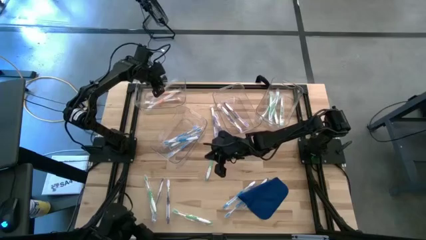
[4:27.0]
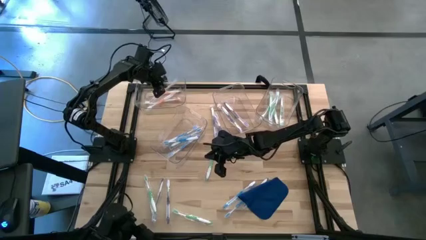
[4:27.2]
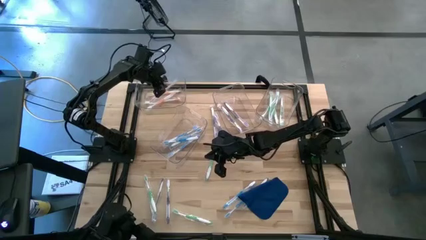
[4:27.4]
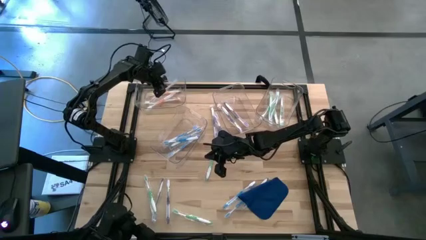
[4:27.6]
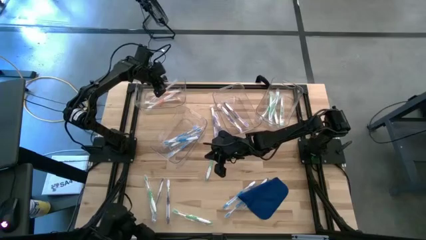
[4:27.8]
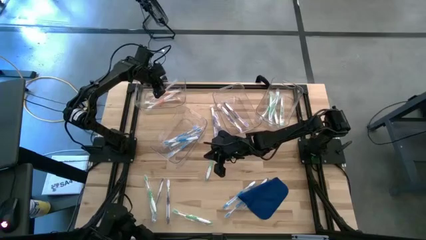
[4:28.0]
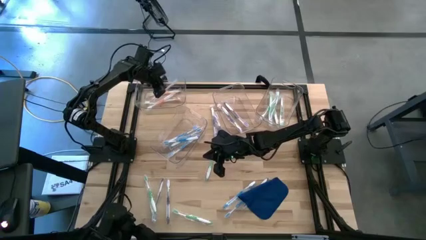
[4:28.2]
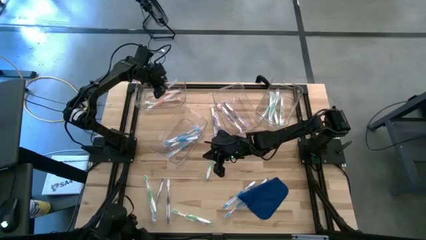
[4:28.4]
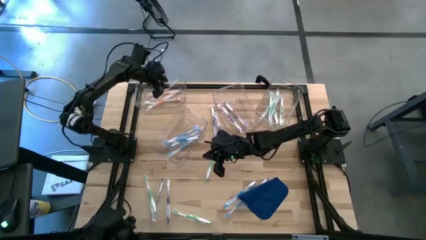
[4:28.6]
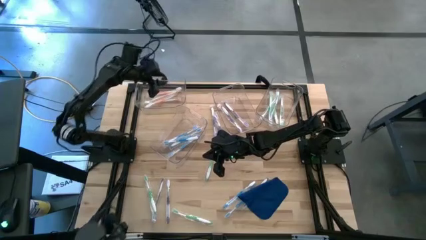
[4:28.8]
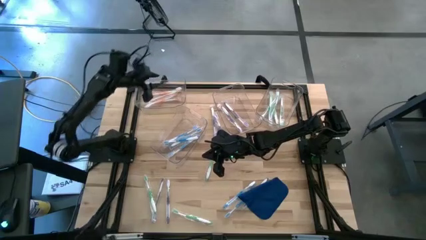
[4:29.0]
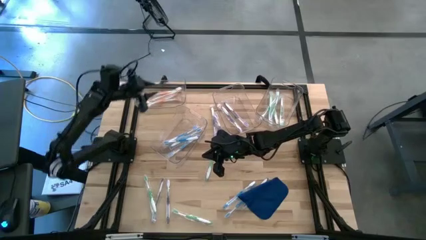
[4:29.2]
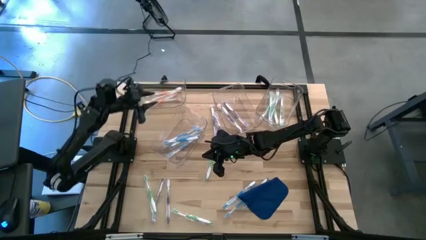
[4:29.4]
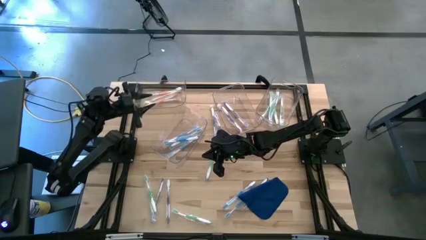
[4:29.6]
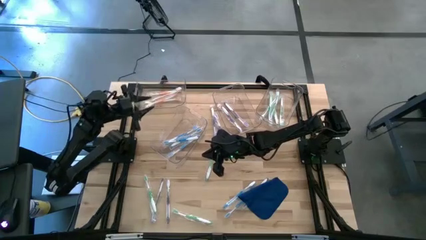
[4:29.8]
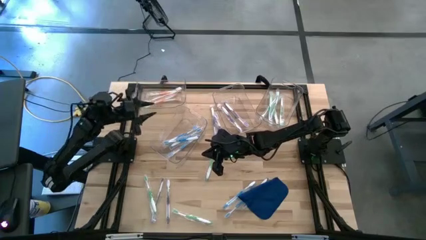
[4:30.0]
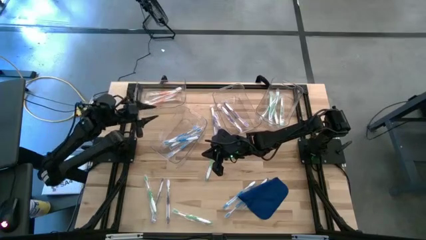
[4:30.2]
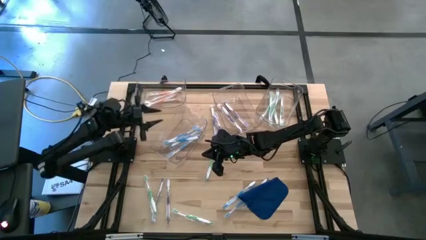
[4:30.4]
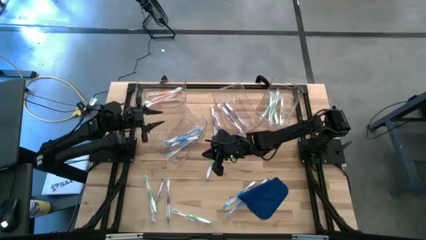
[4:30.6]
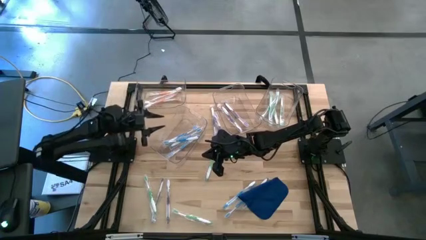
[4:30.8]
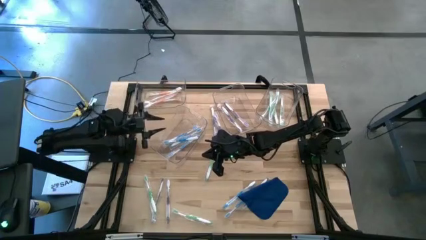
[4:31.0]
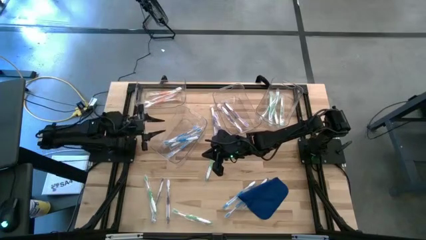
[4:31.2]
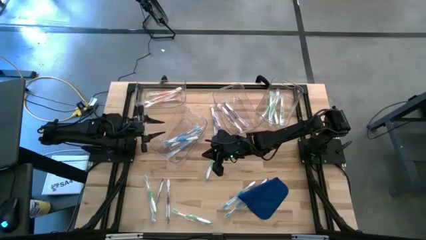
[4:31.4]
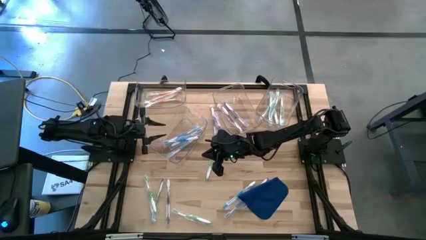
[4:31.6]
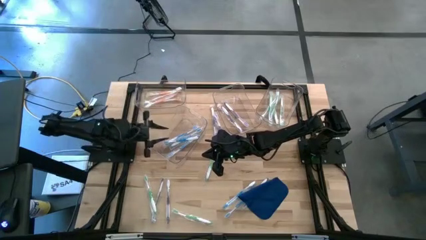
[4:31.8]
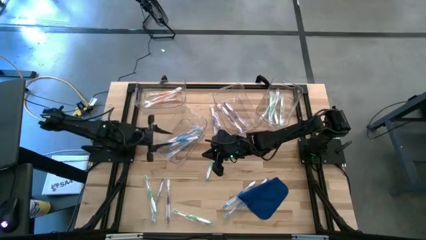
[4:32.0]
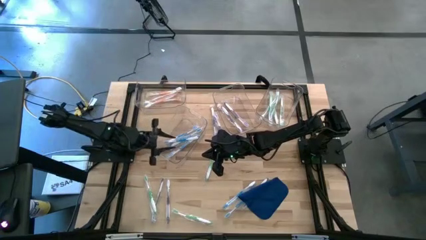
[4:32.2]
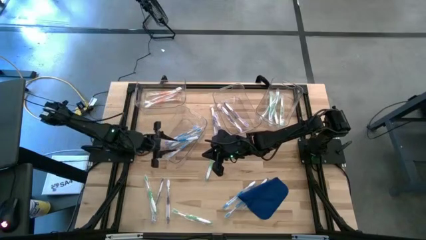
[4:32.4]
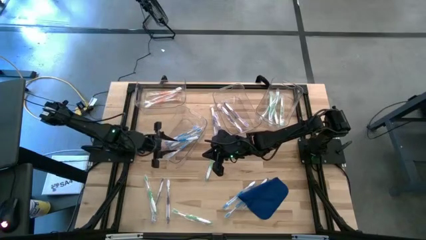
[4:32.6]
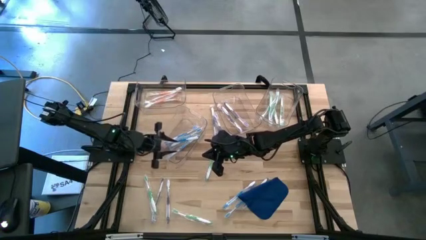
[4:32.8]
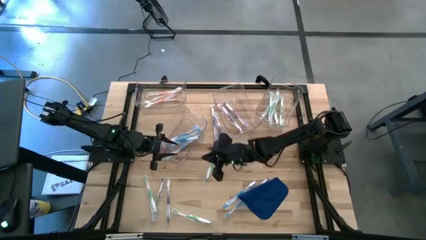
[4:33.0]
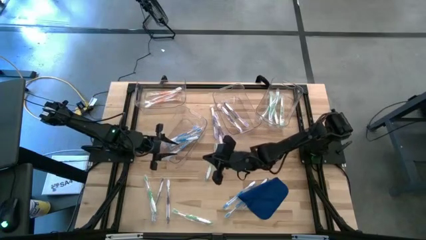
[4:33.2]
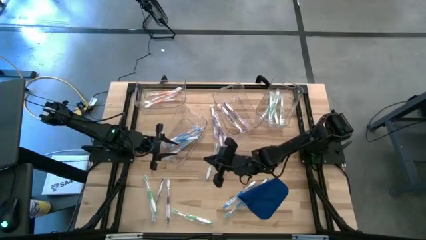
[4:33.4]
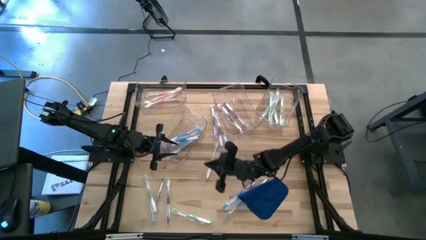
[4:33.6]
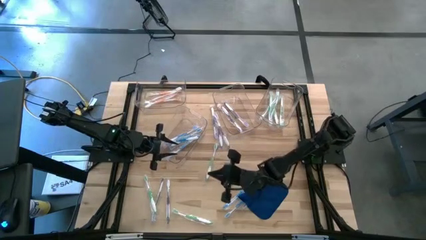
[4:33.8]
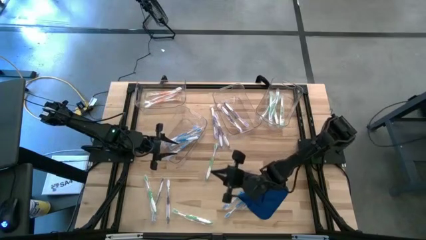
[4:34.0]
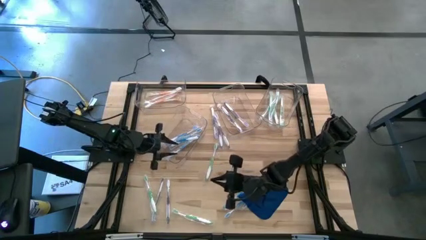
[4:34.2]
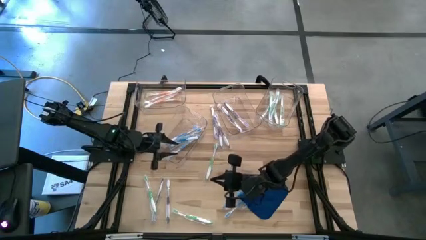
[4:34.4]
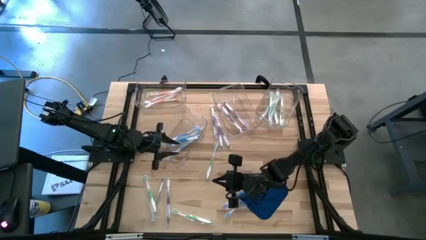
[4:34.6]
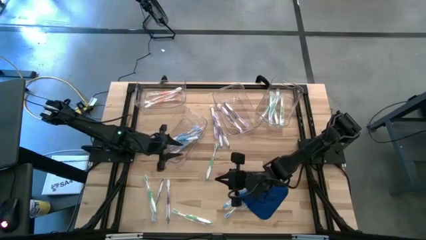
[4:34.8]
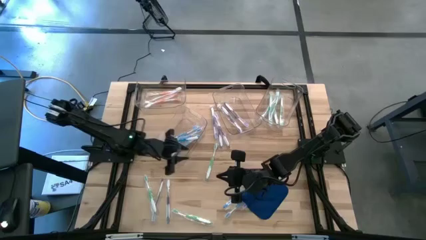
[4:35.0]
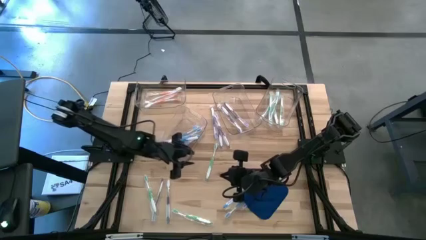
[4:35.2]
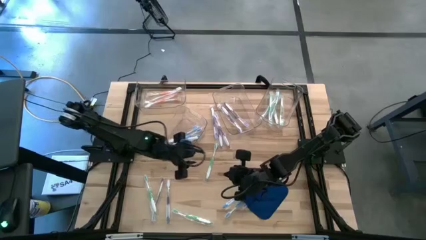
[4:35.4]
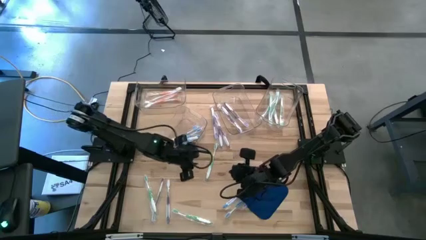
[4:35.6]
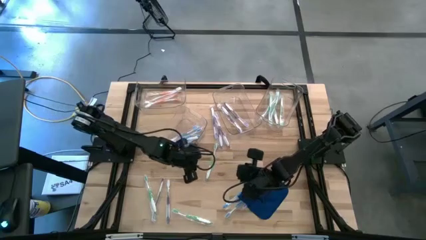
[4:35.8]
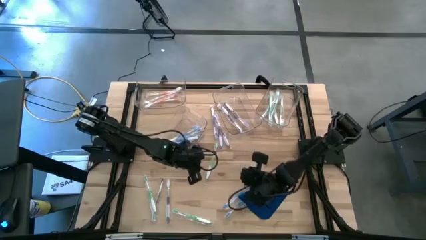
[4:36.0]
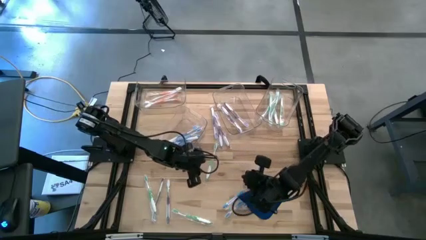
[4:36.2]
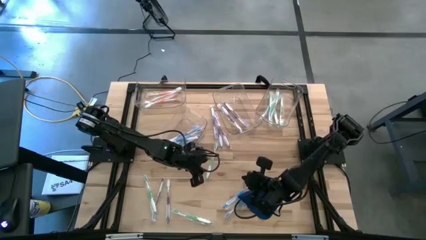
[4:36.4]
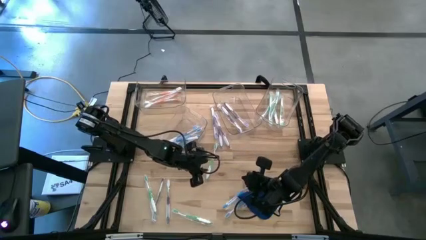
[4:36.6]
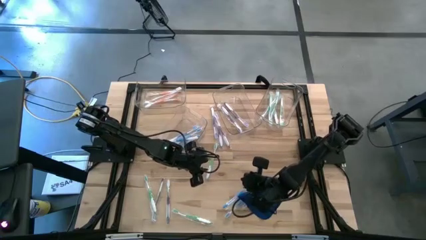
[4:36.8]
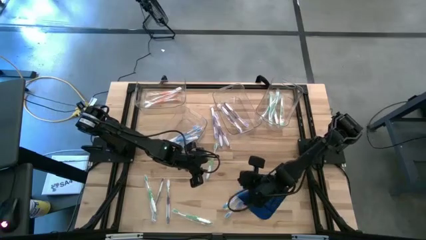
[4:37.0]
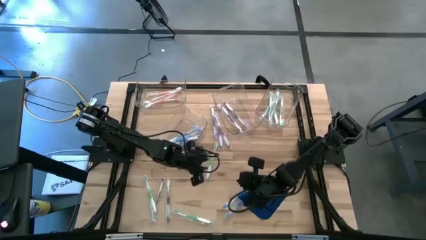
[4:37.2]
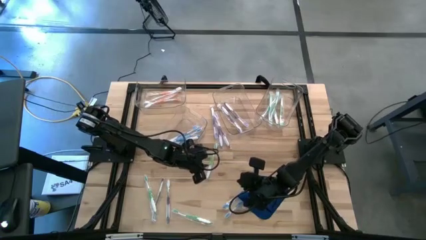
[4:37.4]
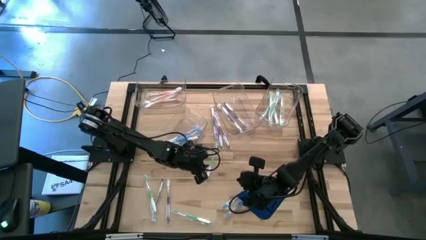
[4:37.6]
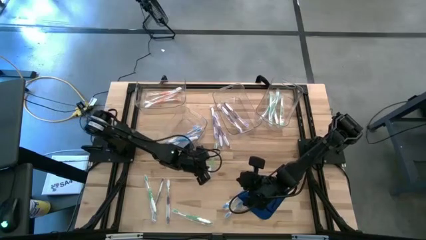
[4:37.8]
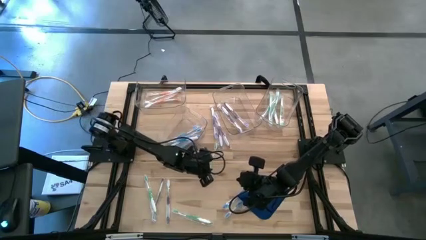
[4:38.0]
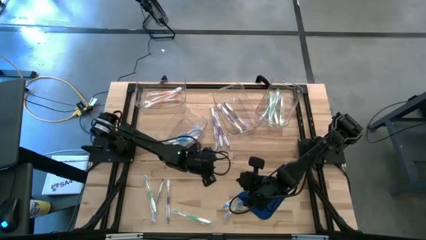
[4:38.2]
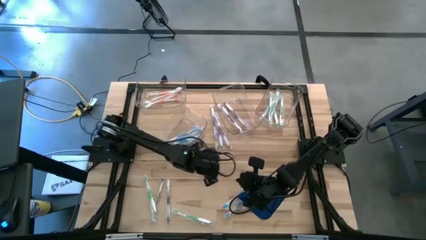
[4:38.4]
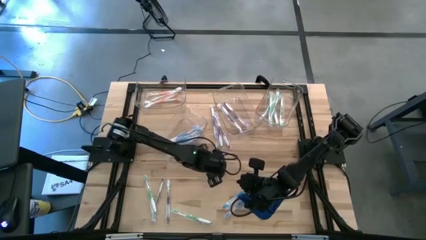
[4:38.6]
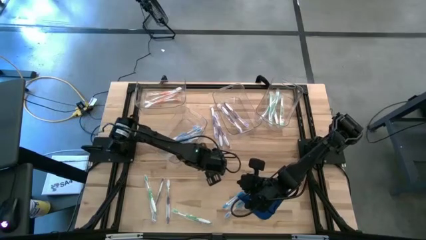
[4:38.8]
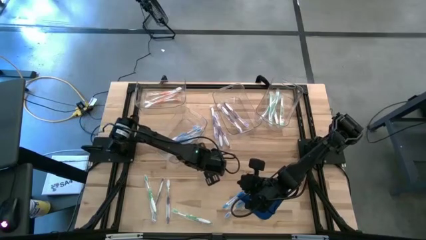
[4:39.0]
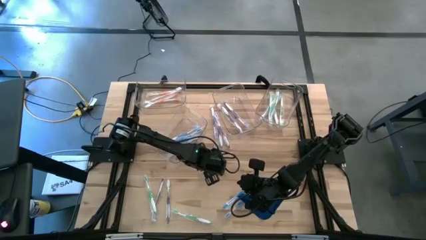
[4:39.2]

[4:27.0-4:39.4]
Task: Pick & Place Toothbrushes
Put the green toothbrush into the top right transparent bin
